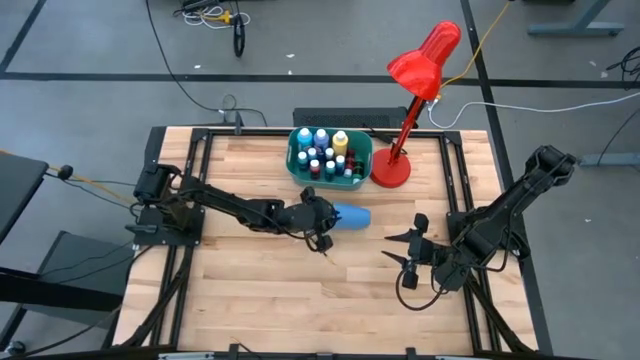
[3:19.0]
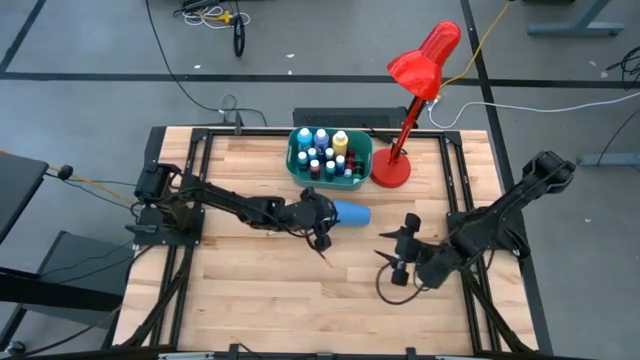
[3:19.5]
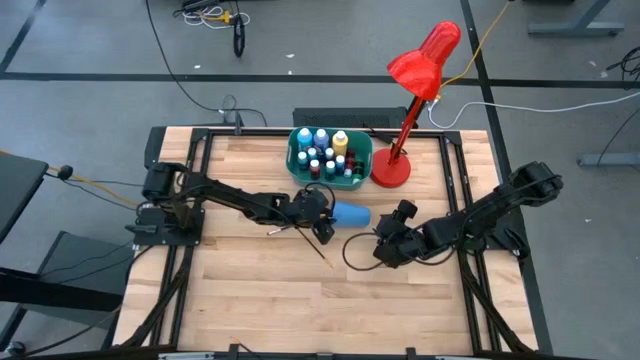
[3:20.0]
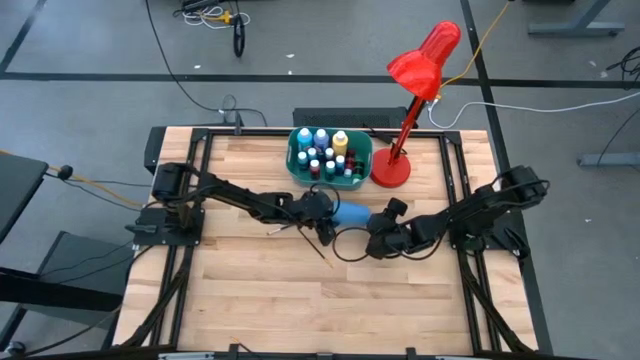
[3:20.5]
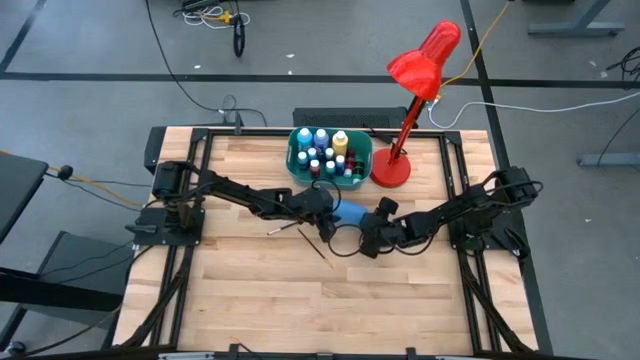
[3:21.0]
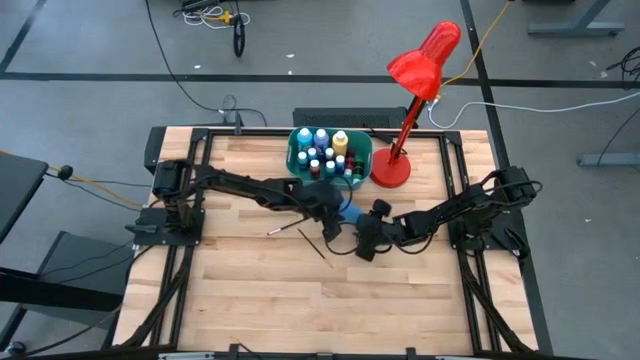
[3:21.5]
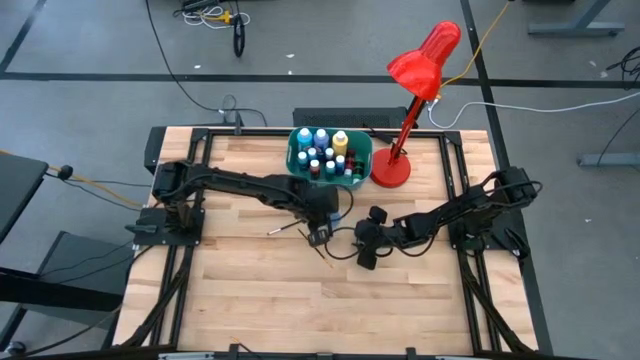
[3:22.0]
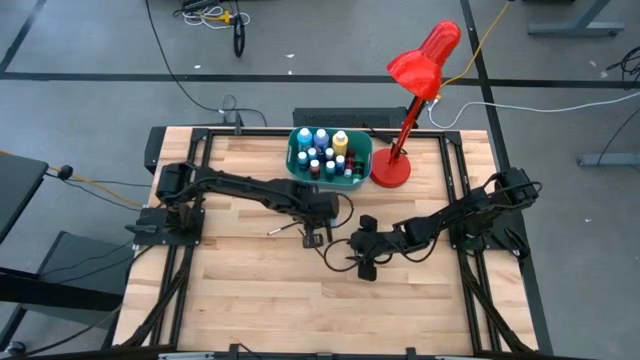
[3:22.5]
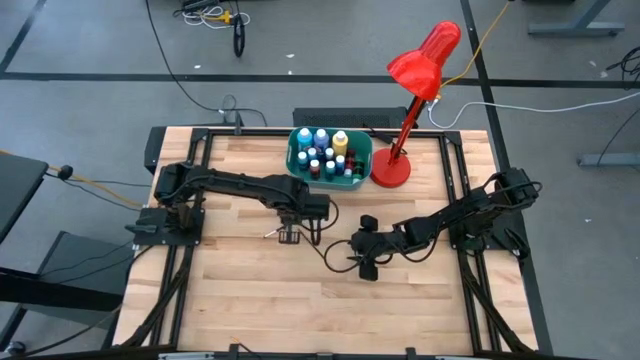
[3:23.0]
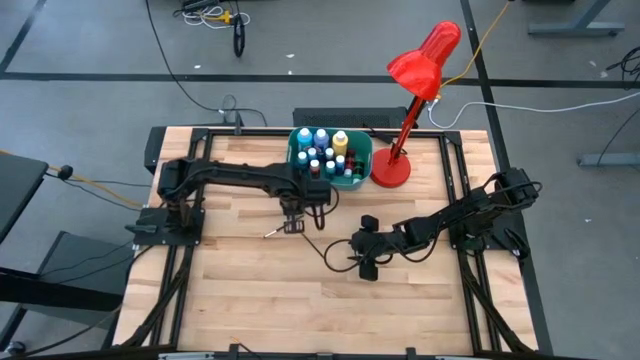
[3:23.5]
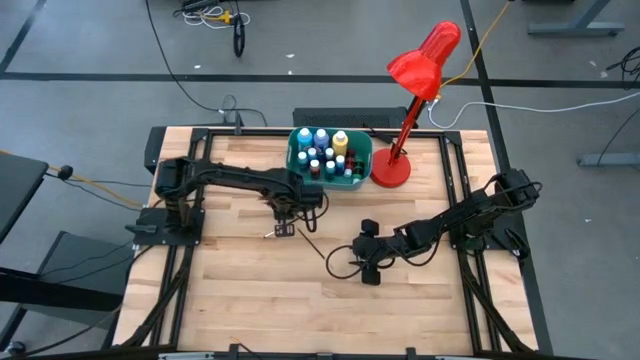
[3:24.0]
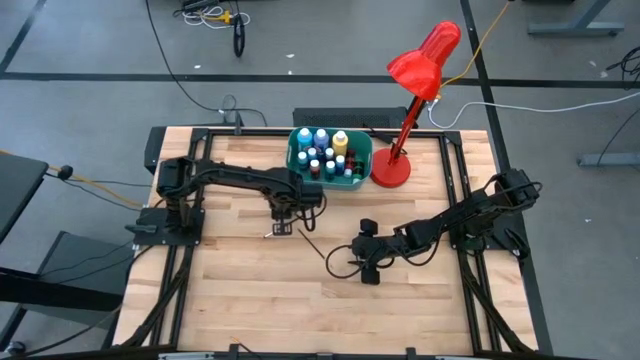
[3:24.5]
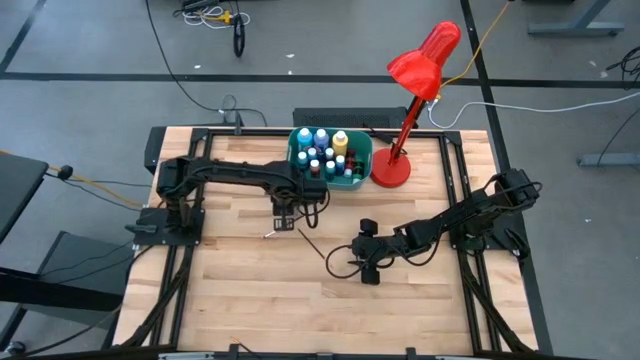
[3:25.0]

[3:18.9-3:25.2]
Task: Pick & Place Paint Supplies
Adjust the blue cup

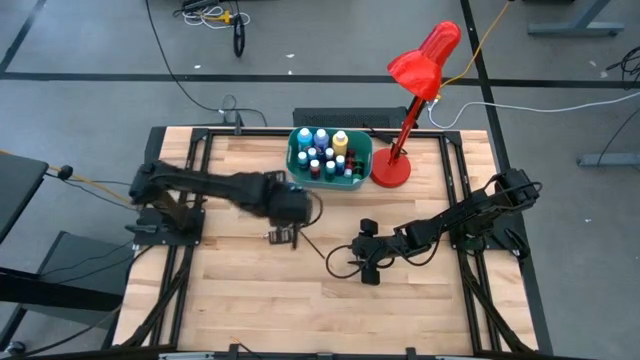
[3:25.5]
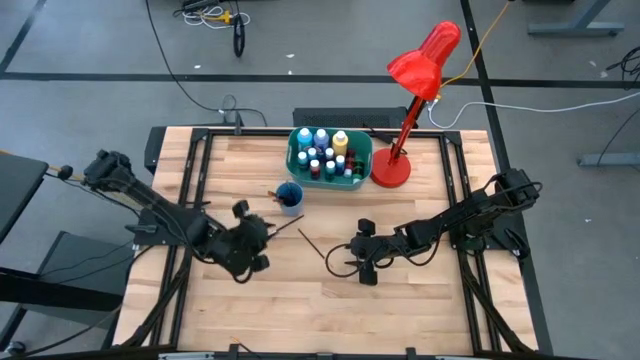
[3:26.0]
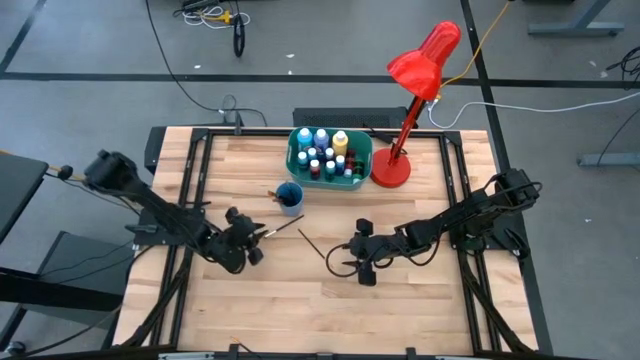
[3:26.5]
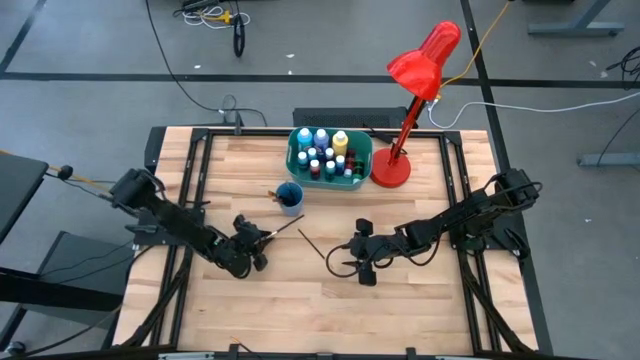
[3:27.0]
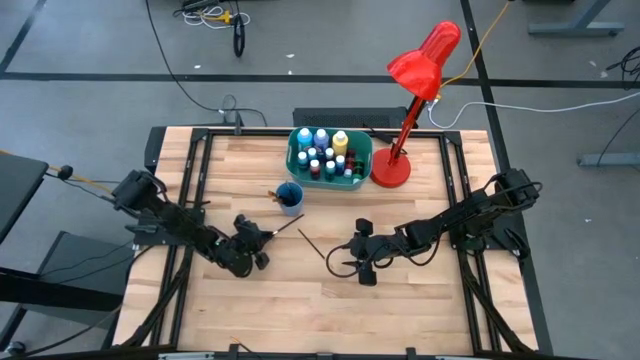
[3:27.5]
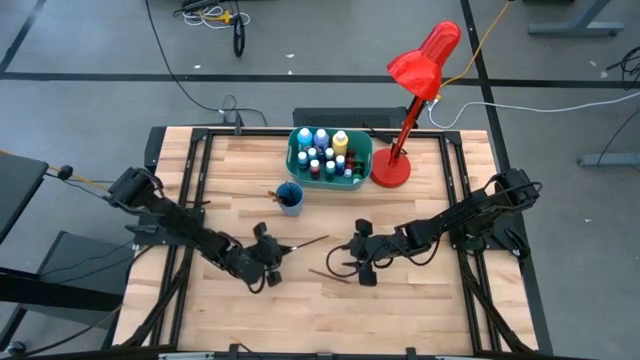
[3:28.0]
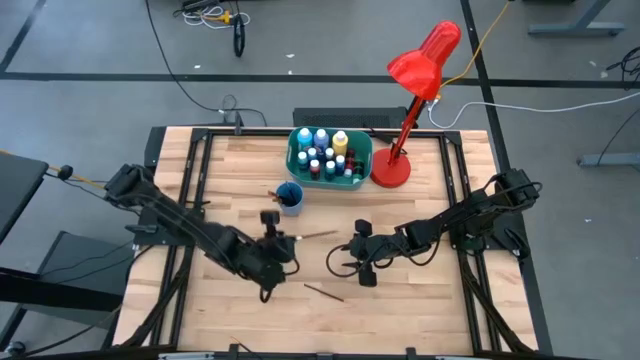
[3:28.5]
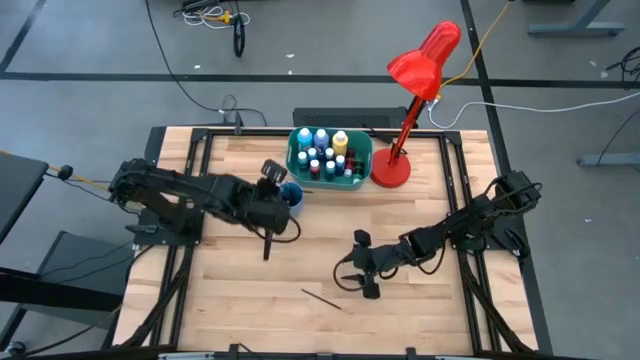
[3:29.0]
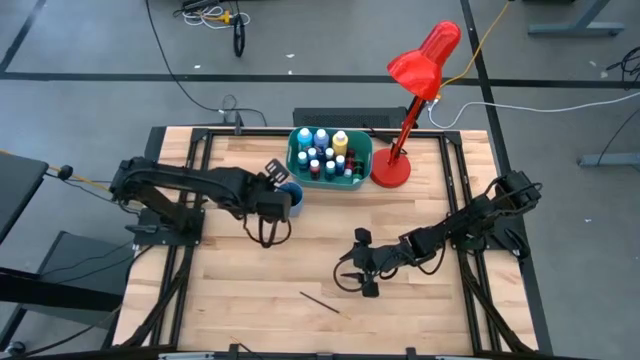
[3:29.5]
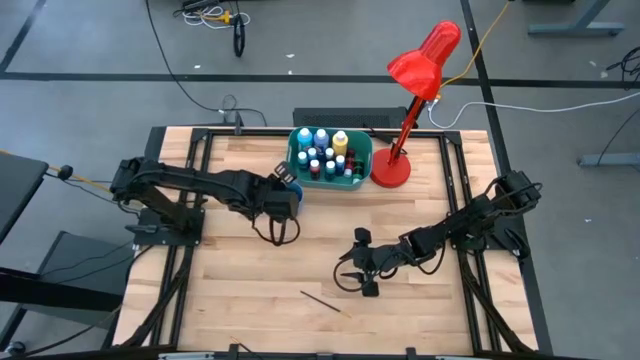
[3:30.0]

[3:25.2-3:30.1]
Put the silver paint brush into the blue cup

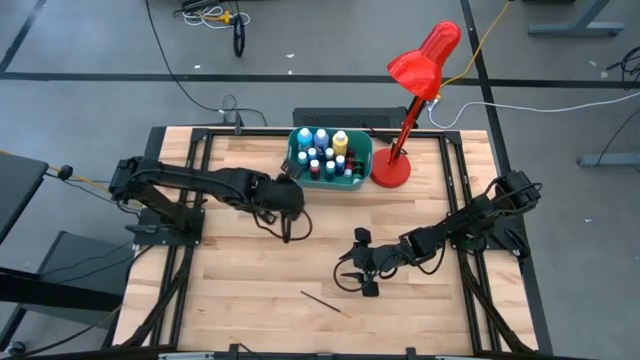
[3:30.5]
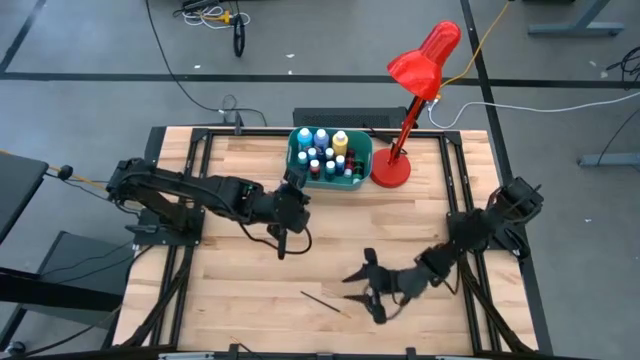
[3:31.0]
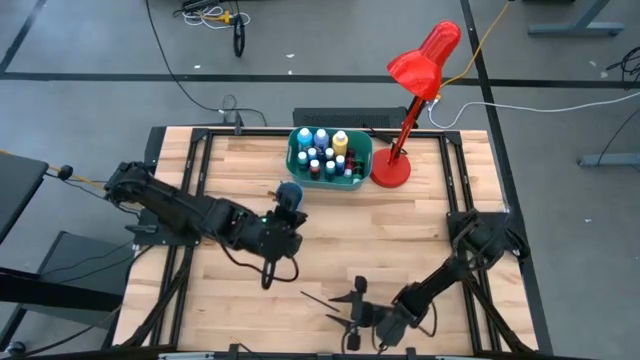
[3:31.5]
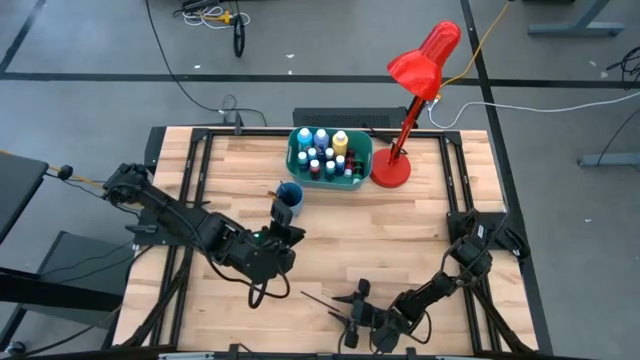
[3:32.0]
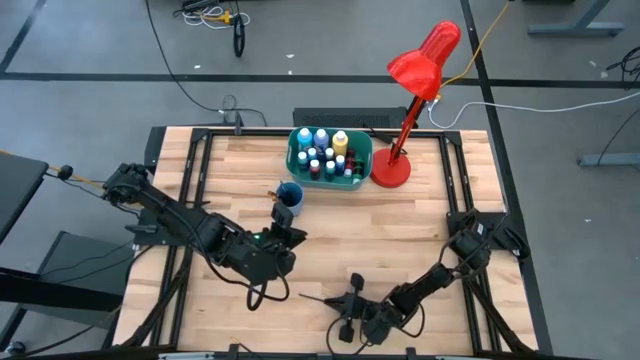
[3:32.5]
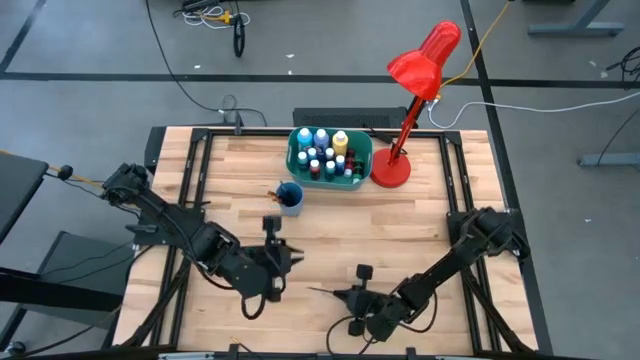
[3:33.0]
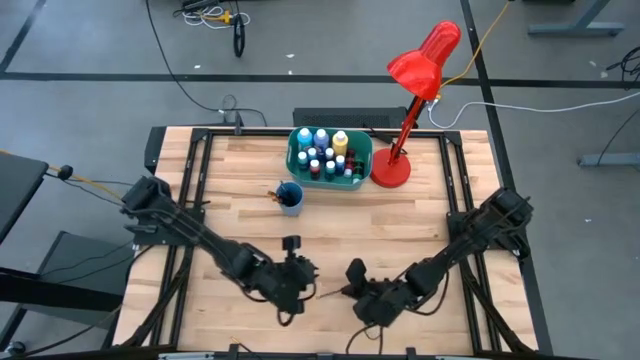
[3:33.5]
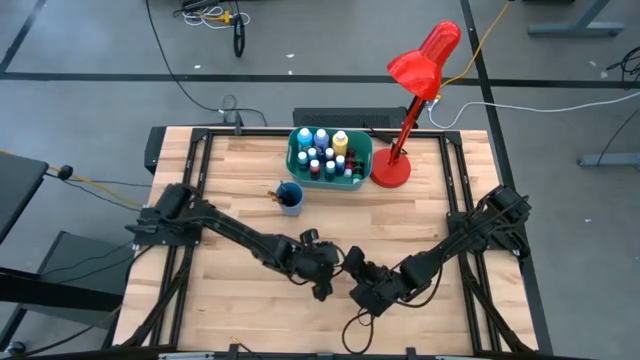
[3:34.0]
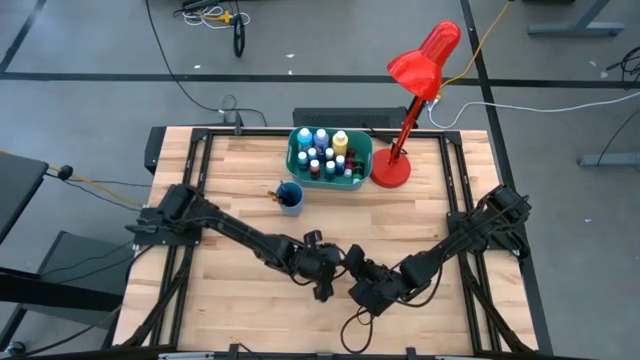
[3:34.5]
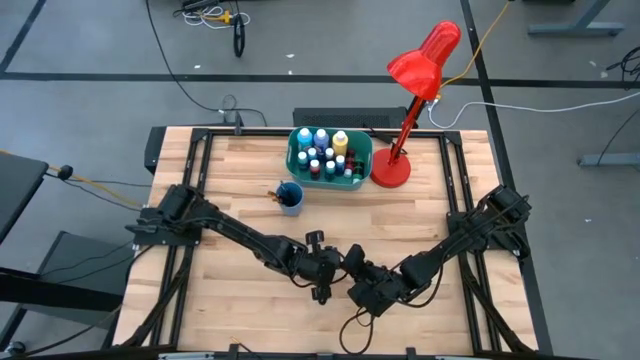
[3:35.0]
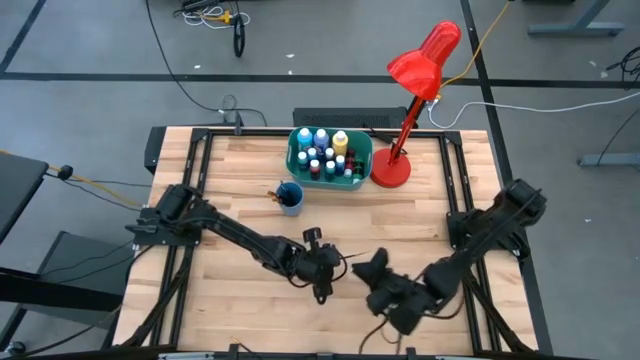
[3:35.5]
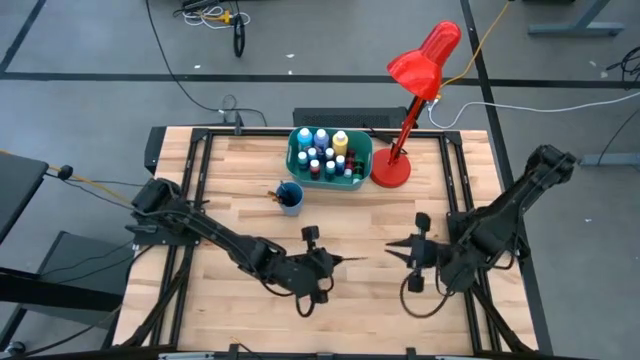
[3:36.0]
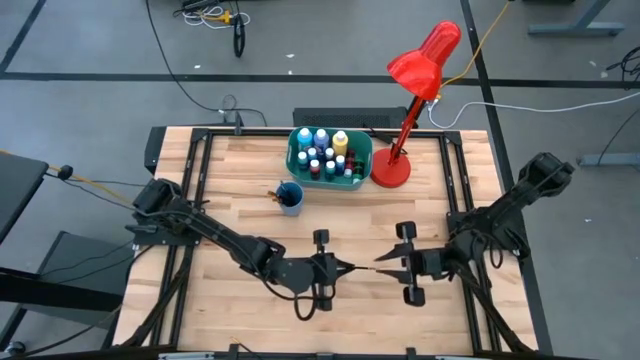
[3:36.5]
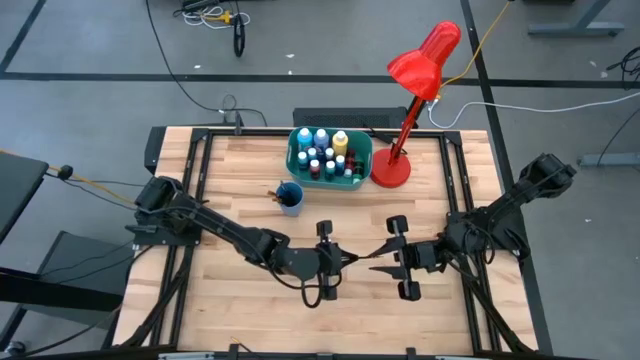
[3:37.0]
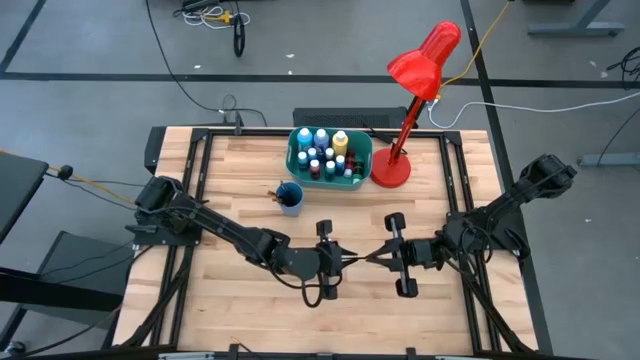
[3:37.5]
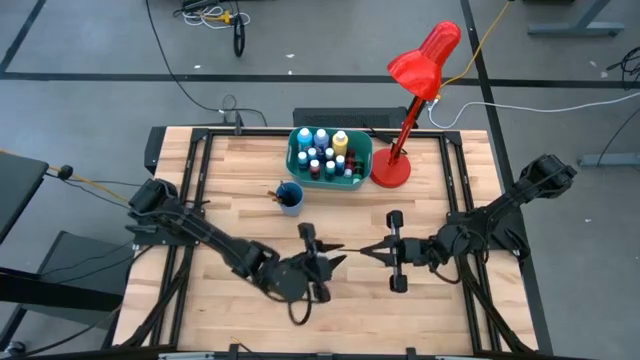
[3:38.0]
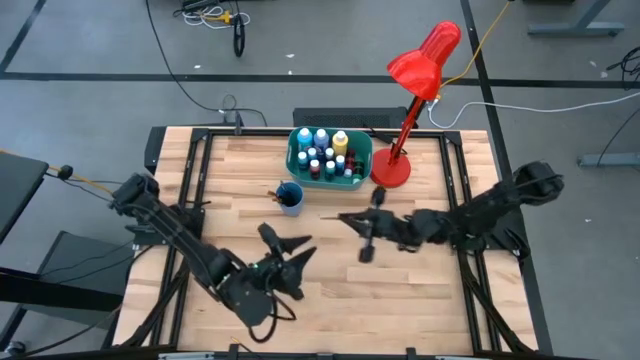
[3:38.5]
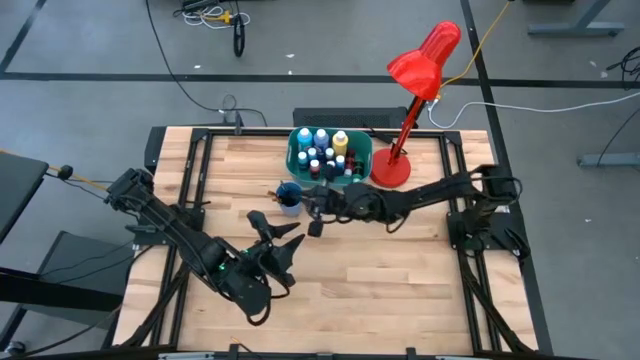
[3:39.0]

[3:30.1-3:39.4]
Put the gold paint brush into the blue cup
